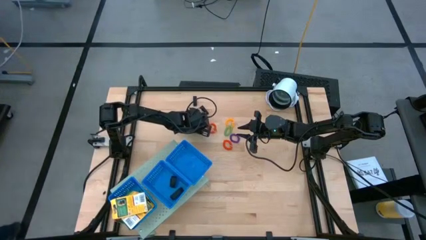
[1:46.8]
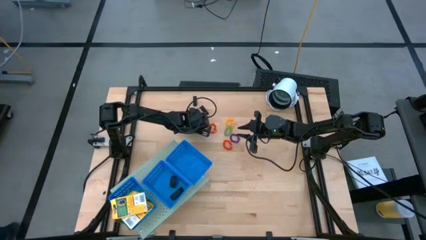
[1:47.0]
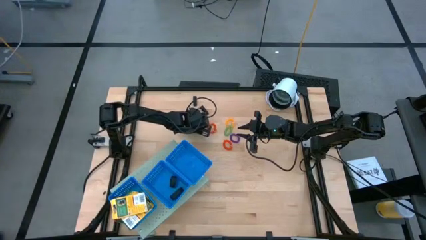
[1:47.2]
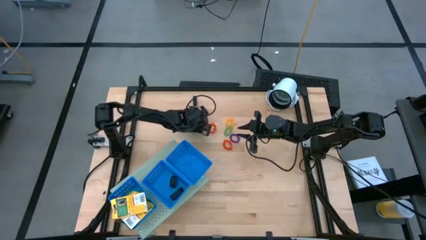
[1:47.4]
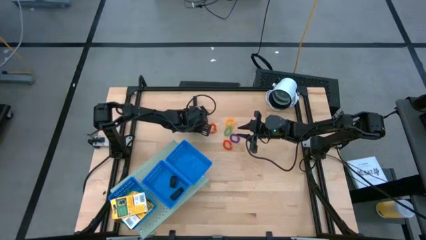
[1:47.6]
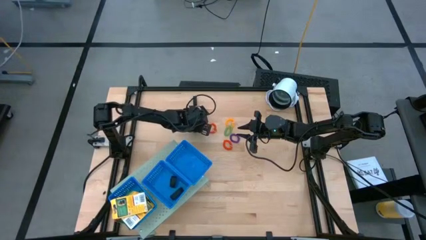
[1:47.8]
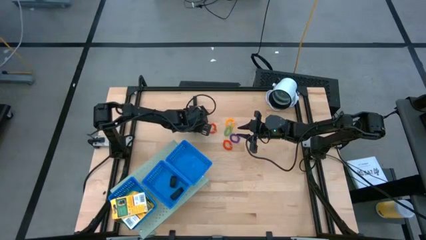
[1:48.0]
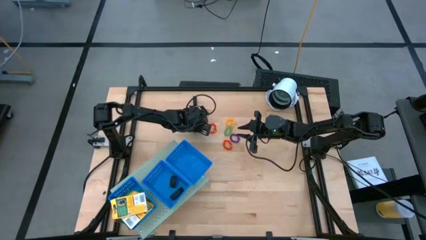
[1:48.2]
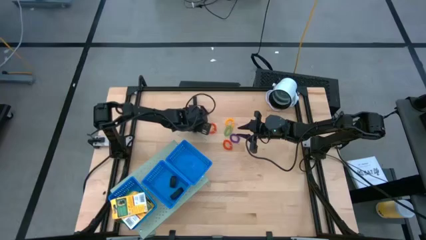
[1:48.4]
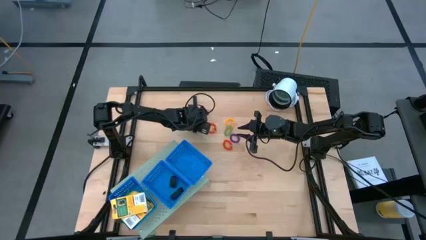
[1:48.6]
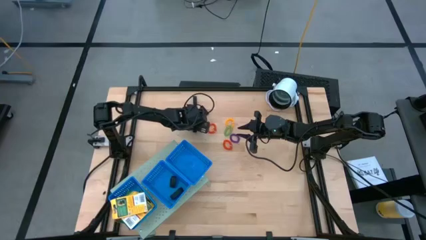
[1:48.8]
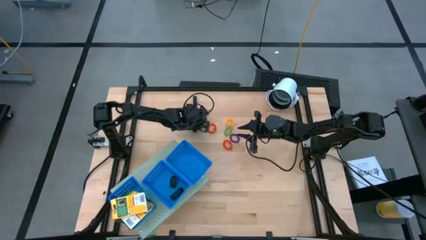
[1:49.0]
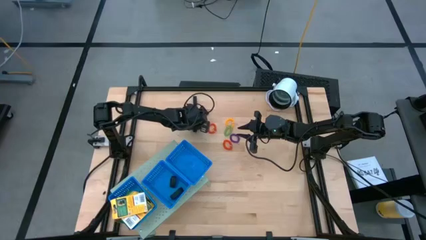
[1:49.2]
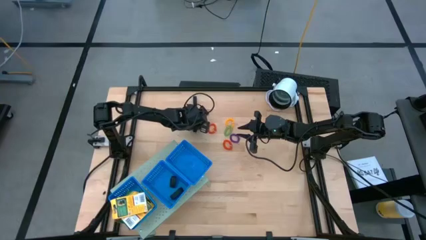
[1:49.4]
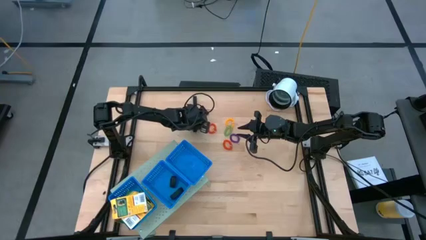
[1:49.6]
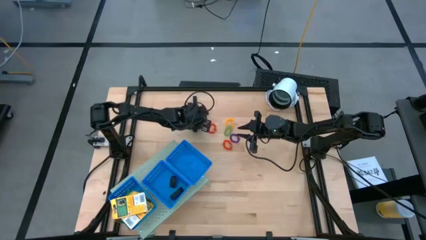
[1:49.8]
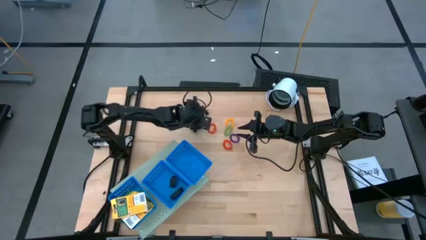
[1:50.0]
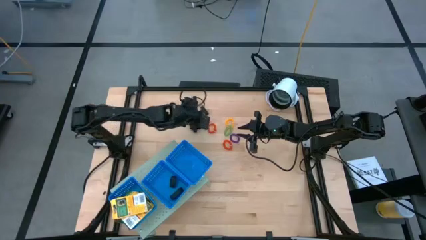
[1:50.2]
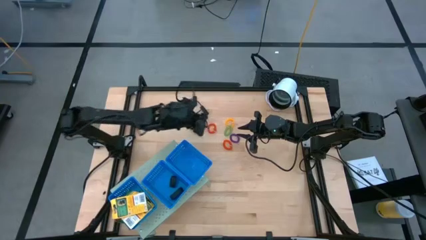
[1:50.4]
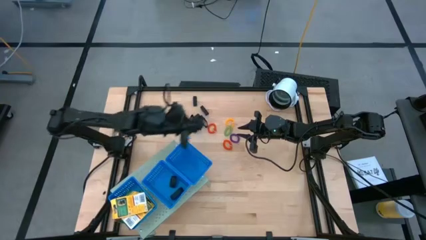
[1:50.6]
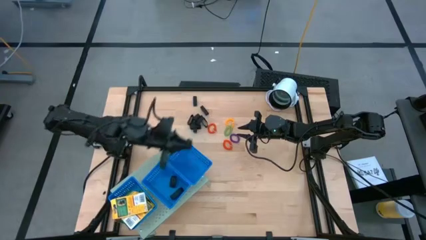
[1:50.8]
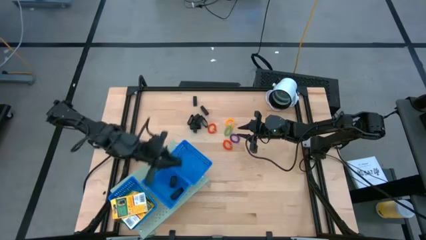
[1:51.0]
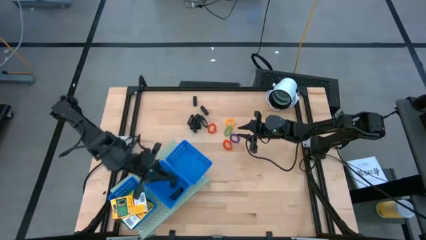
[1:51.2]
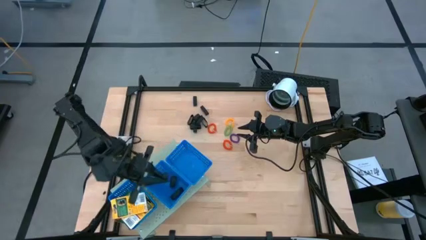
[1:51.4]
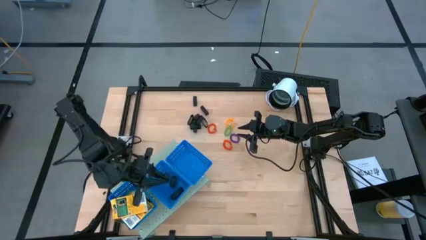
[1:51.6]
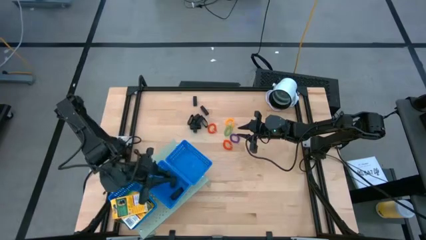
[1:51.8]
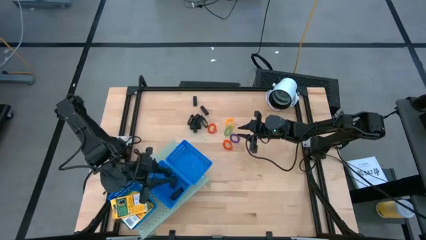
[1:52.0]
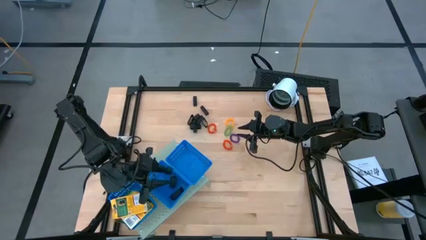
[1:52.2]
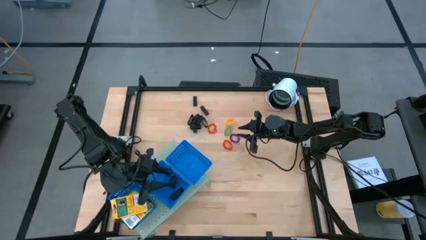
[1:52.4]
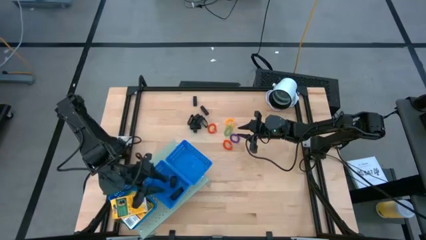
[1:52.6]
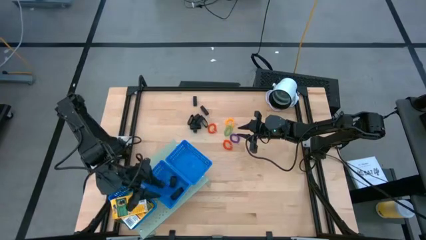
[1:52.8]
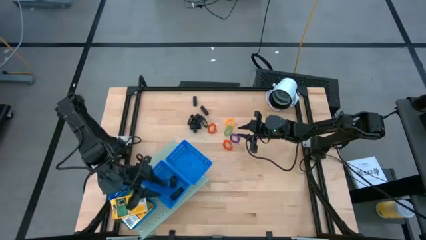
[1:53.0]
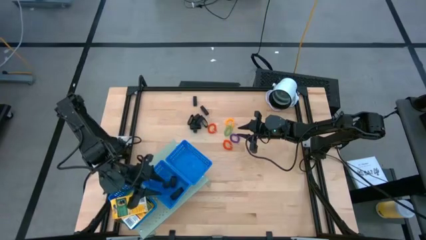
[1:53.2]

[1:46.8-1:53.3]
Task: Pick & Place Office Desk Supplies
Put the black rubber band into the center blue basket on the shelf

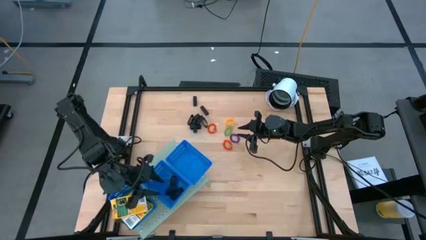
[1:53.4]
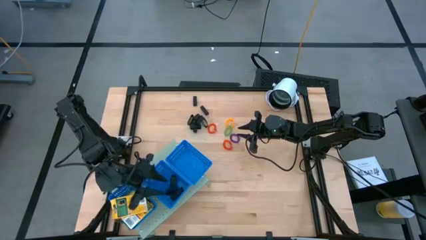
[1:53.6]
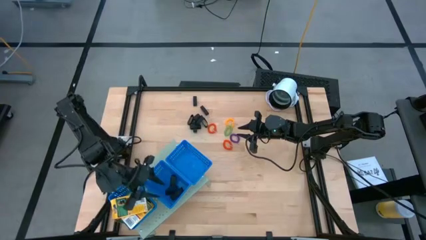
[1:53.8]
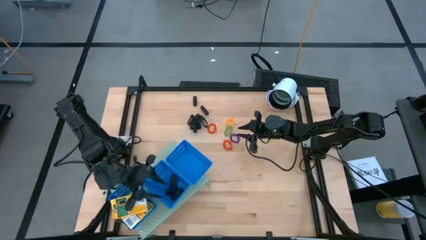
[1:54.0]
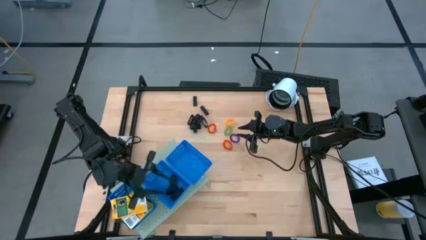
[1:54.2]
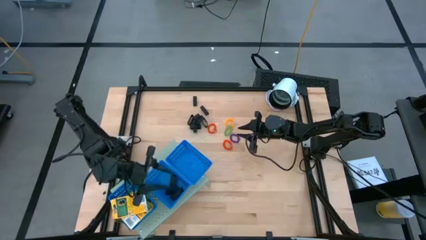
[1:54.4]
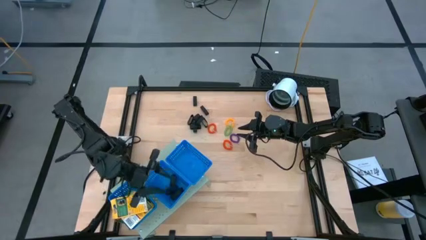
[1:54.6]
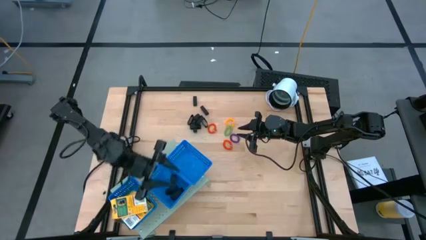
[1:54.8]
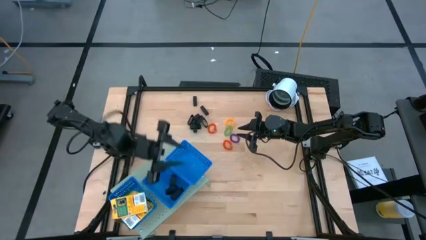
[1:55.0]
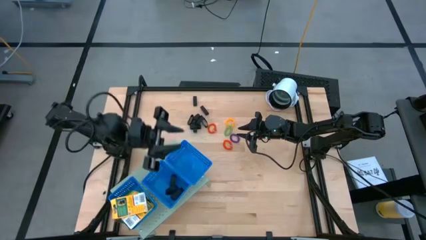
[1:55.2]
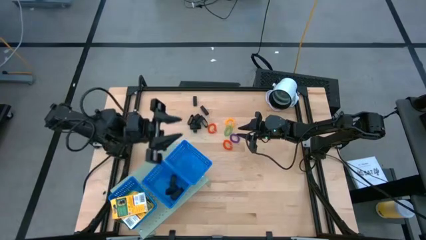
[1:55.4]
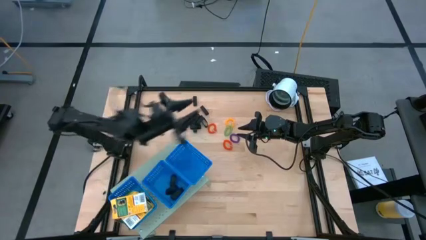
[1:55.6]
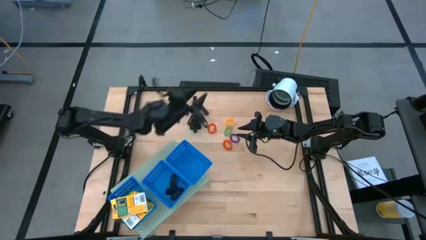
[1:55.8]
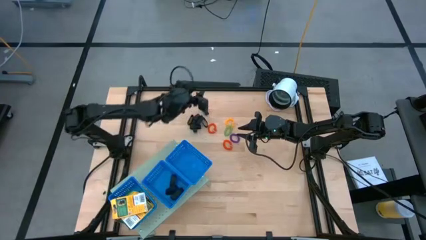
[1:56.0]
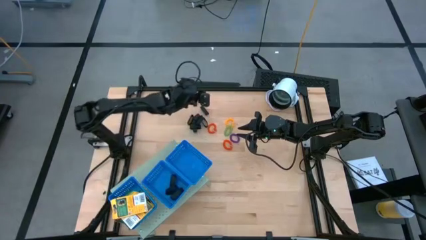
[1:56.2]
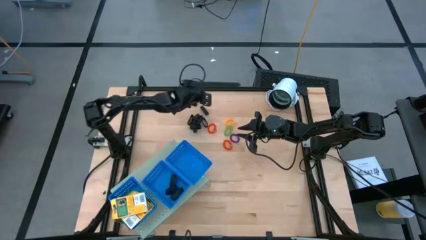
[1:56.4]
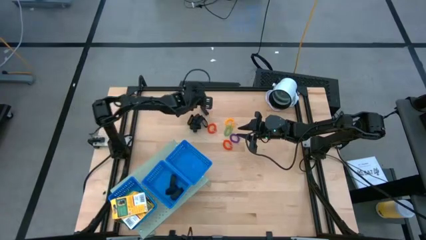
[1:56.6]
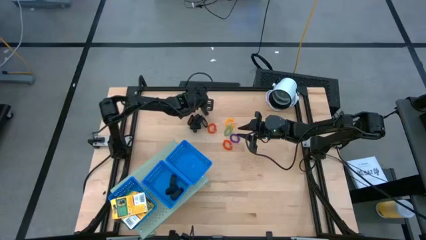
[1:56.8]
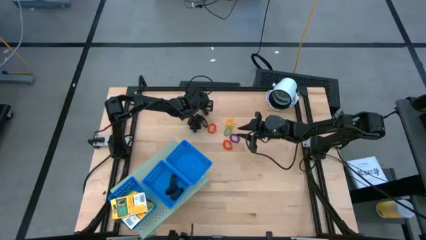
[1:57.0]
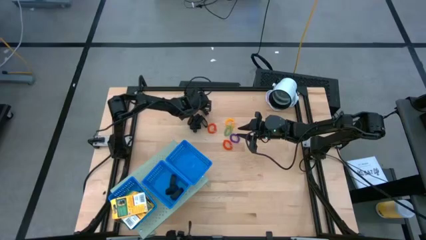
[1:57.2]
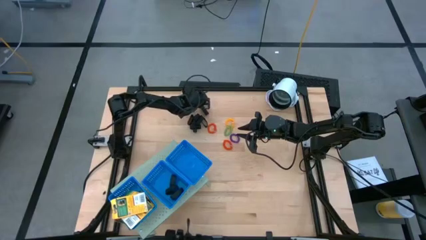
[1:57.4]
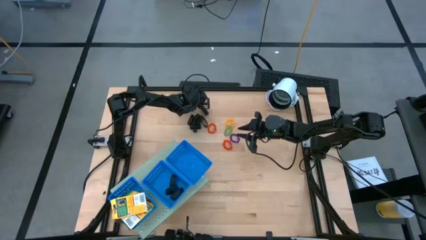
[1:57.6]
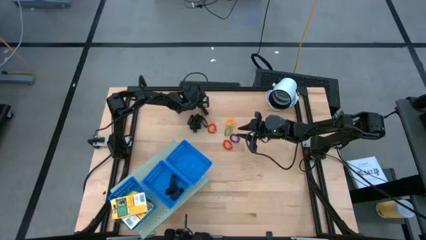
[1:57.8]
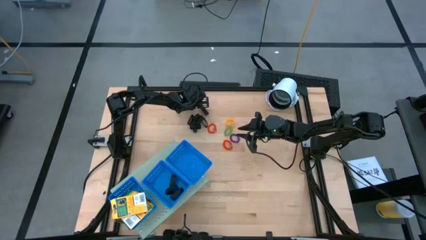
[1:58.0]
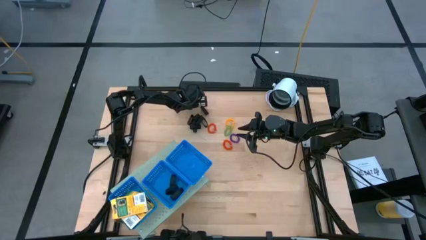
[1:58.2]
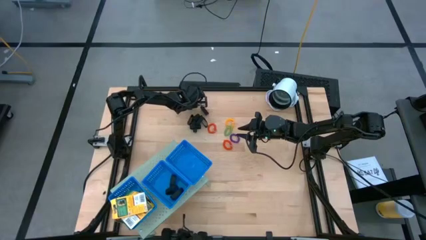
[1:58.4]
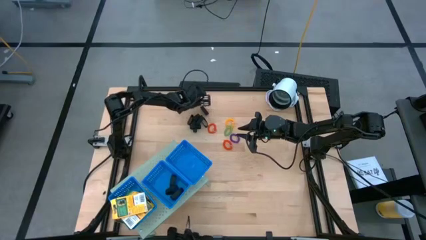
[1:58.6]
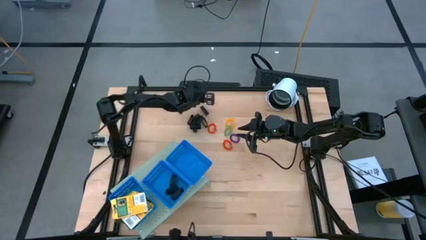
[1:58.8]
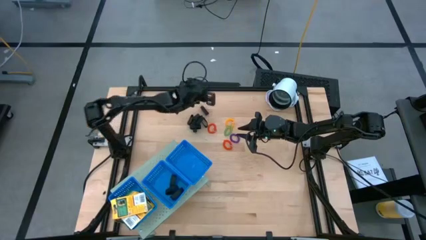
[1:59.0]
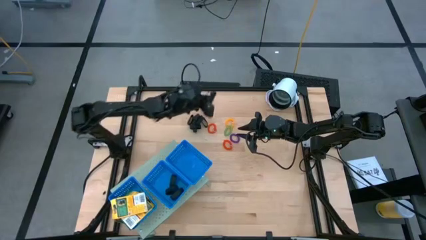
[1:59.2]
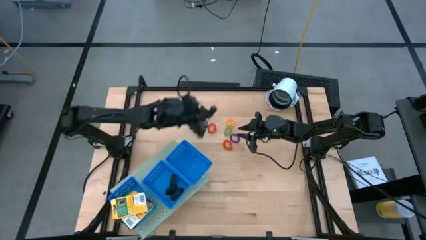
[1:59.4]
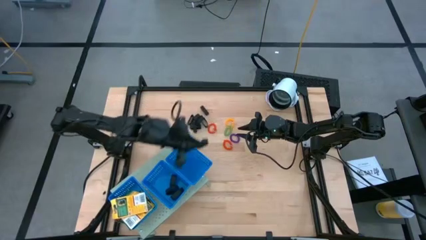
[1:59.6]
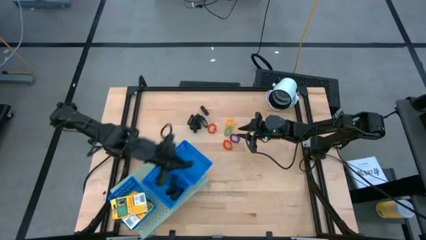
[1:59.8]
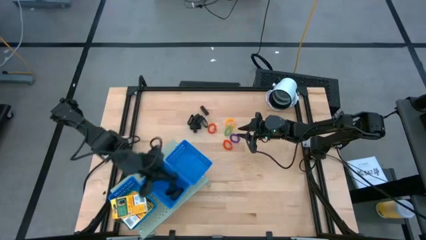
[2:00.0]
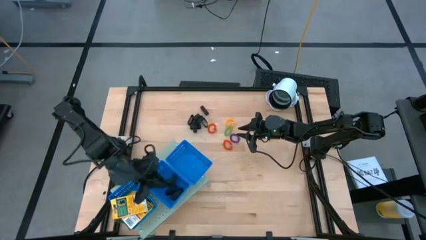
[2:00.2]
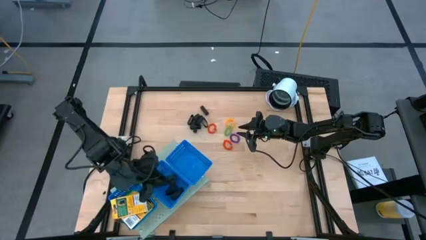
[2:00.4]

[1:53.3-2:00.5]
Put the black rubber band into the center blue basket on the shelf

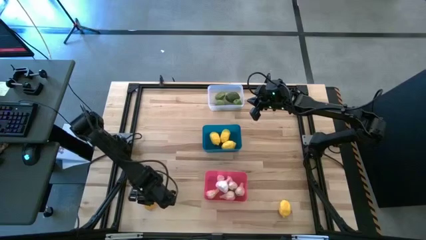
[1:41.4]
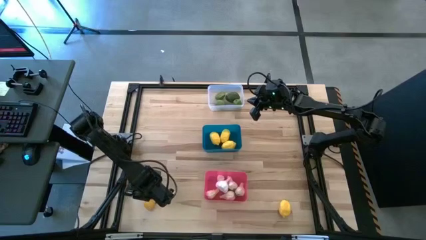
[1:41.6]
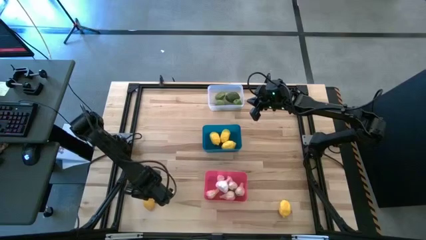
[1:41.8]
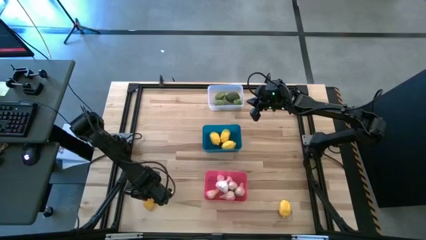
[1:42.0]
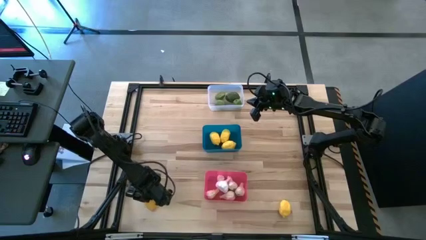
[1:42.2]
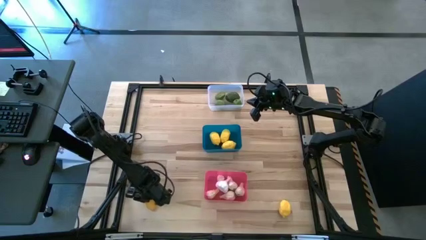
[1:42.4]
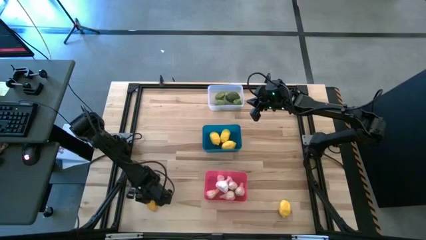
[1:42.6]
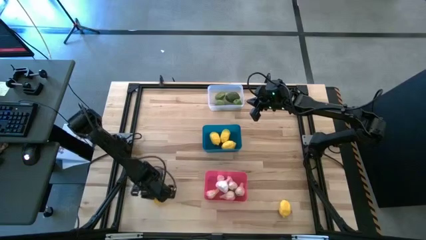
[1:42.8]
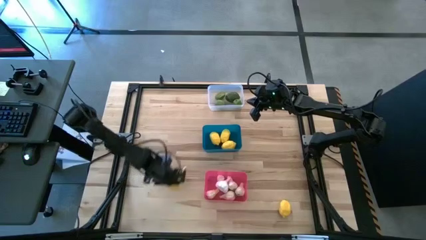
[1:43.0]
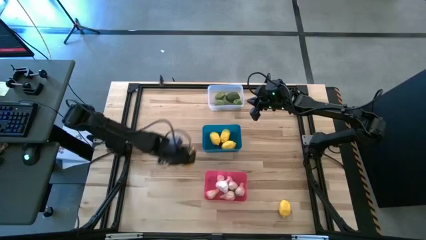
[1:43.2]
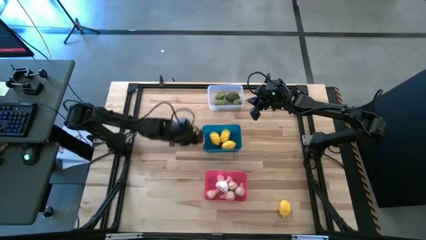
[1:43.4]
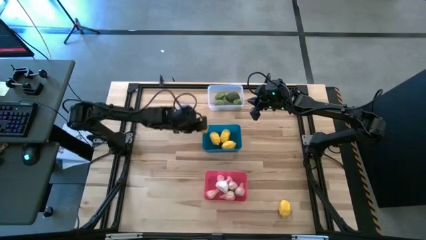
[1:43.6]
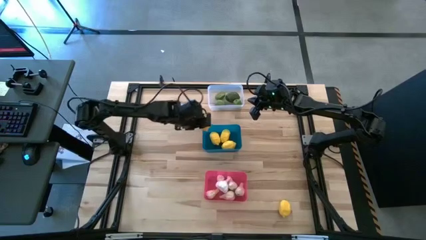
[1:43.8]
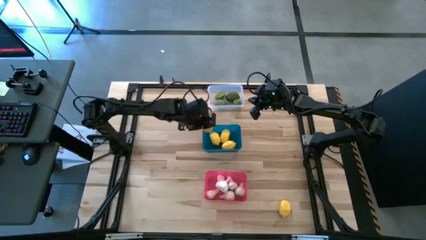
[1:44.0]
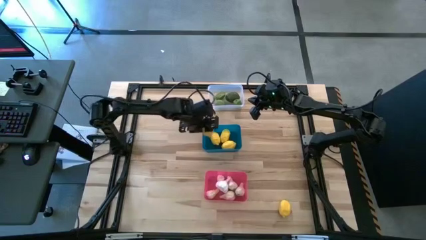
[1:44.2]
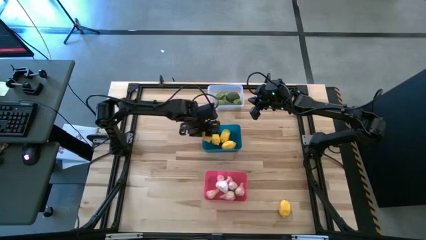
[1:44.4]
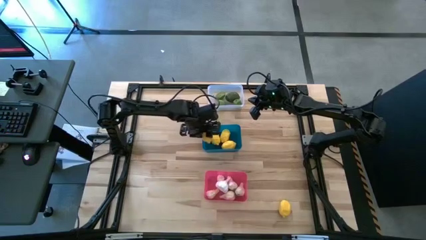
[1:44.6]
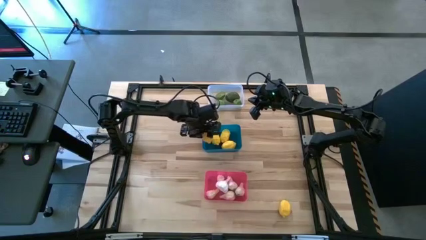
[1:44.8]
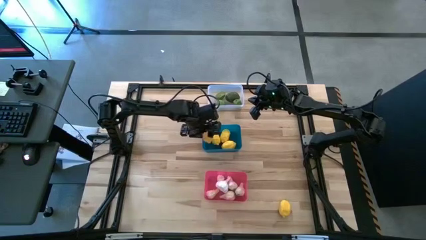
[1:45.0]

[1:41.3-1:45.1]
Task: Sort produce into baskets
Put the left yellow lemon into the blue bin
